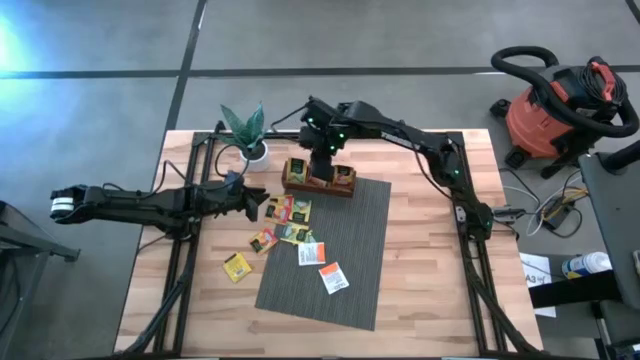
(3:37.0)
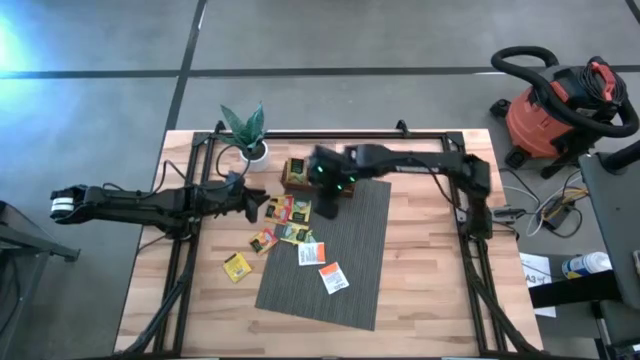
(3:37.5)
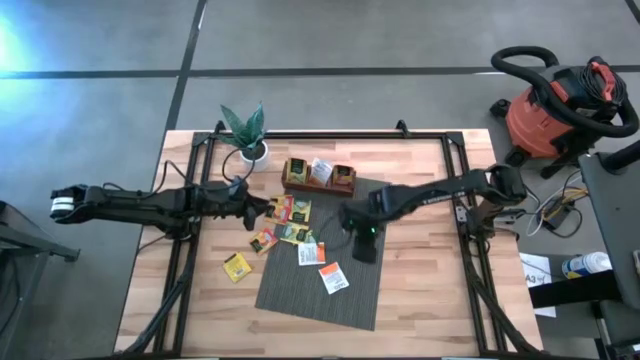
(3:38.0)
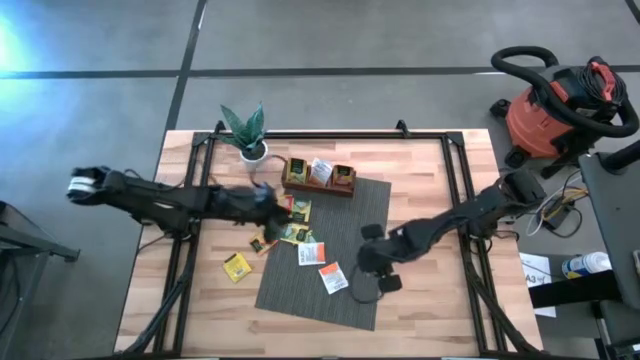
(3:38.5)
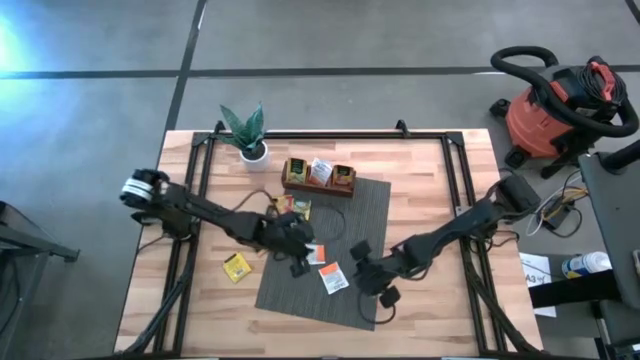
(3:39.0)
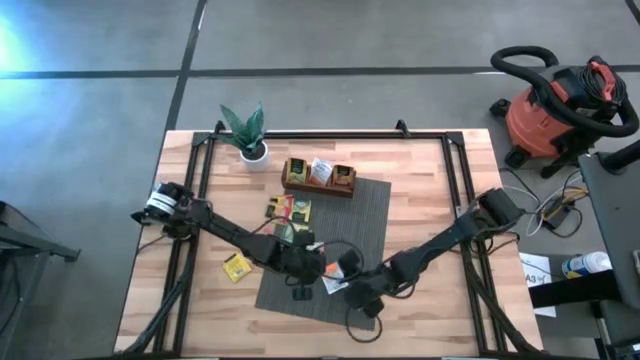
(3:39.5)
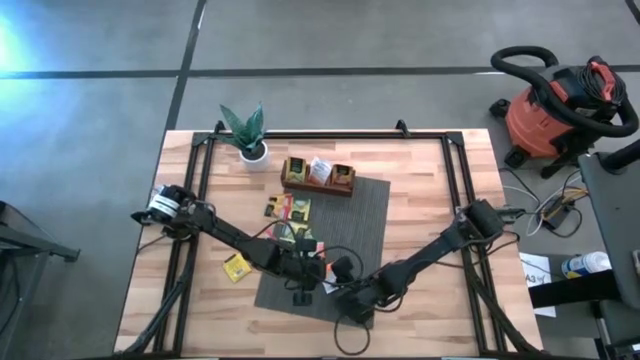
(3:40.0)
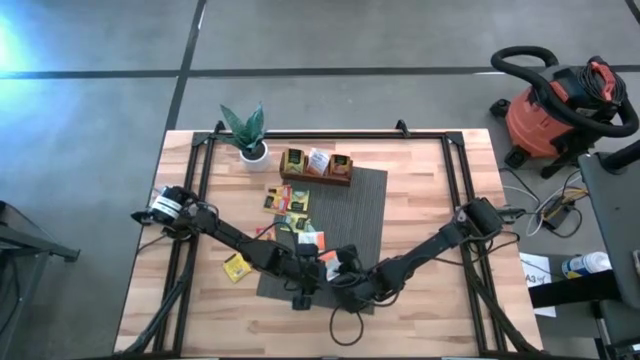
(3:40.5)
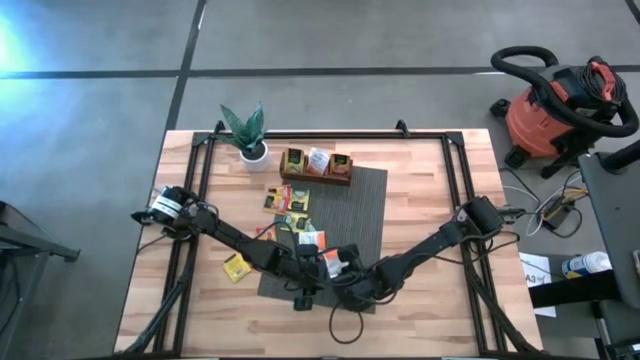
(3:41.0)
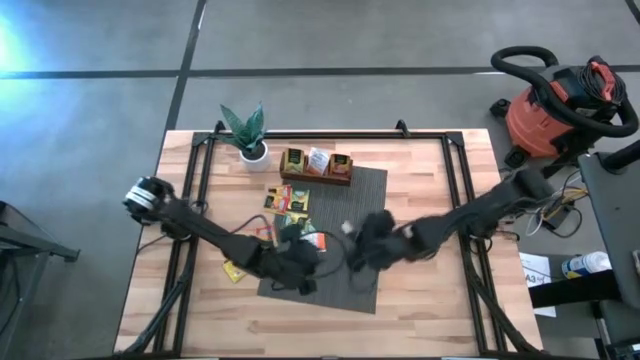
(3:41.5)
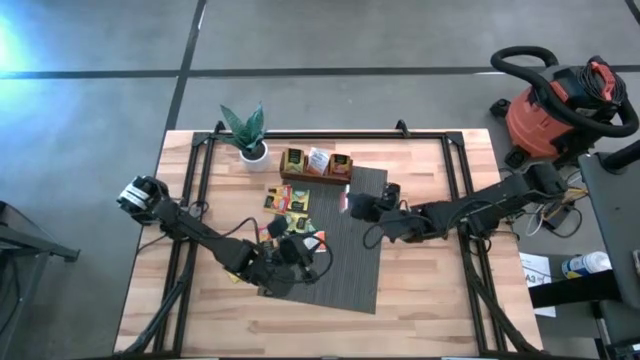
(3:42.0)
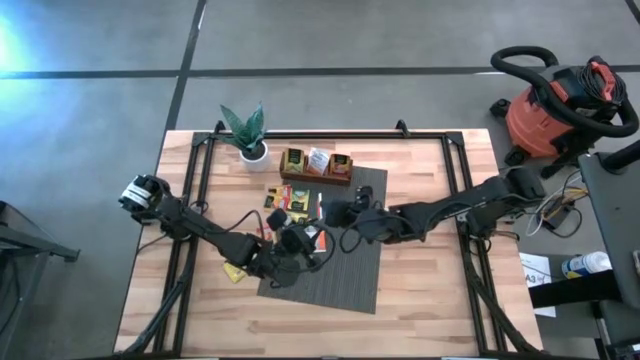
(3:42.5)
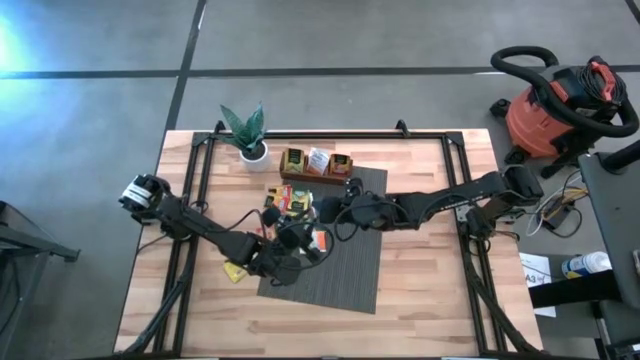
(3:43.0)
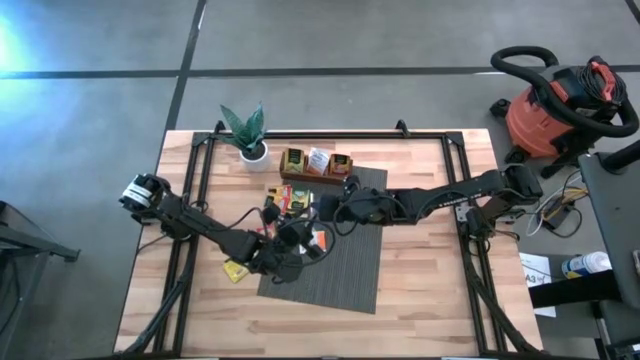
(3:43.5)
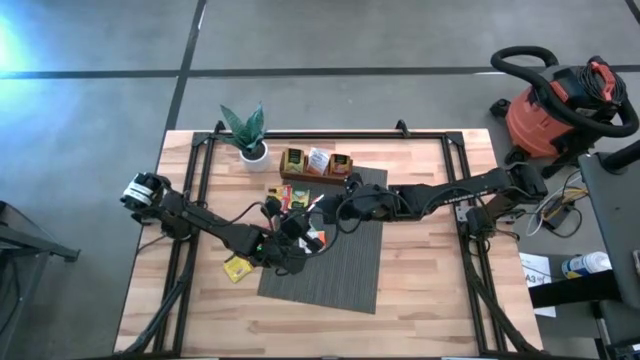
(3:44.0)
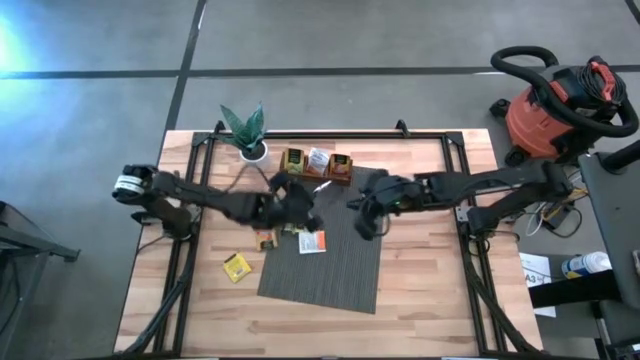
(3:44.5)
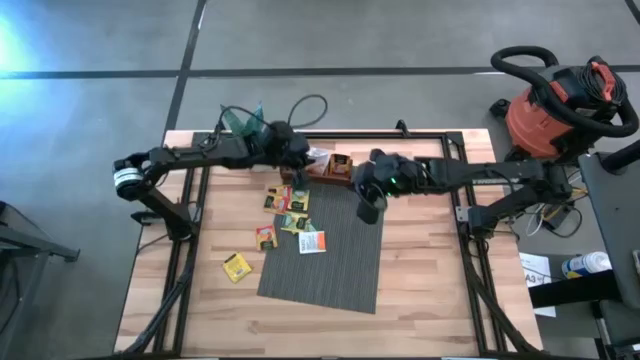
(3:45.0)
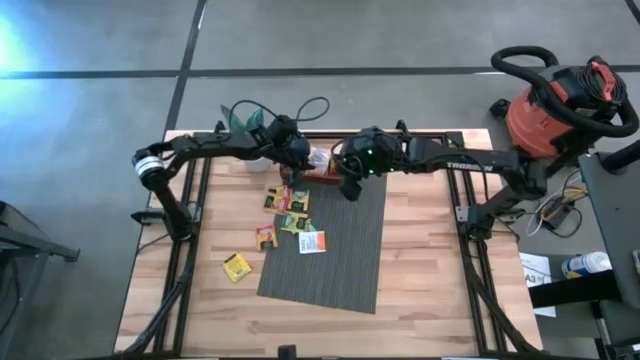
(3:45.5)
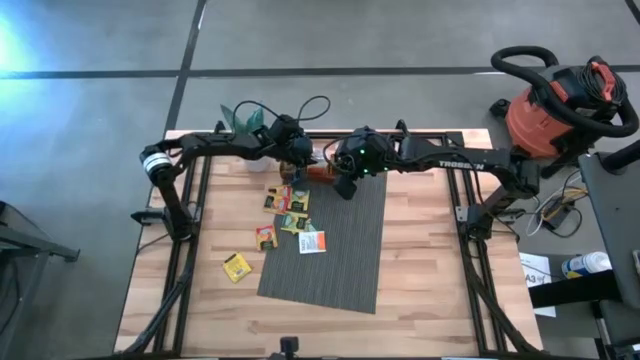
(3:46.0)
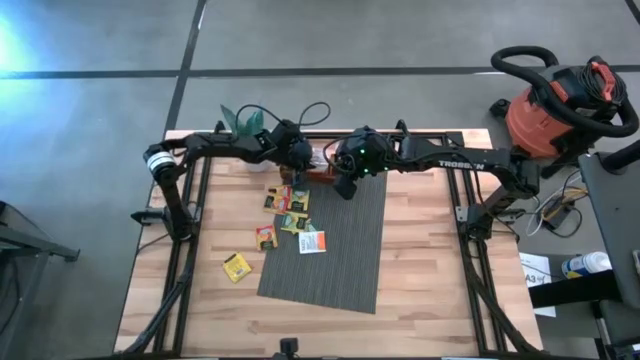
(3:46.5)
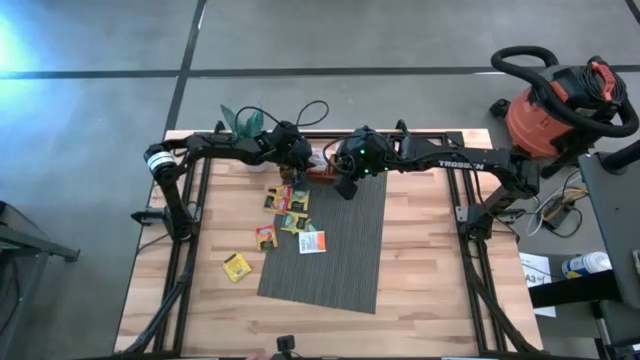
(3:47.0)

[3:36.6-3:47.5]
Task: Pick & Place Tea
Put the bottom white tea bag into the middle compartment of the wooden organizer

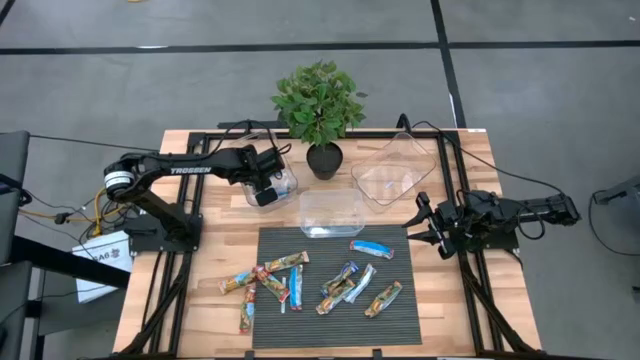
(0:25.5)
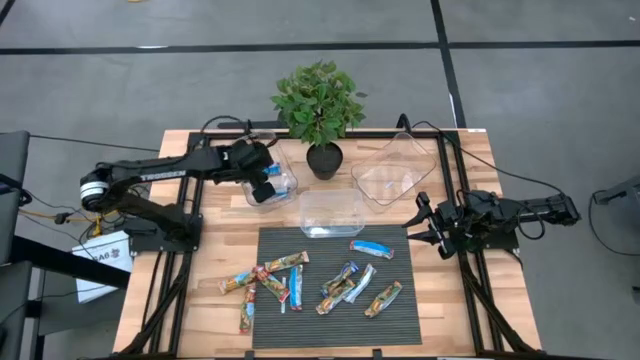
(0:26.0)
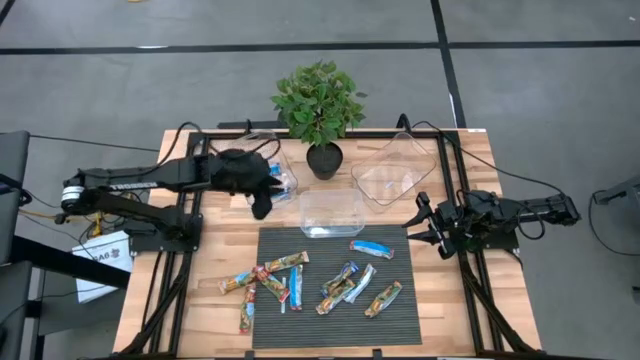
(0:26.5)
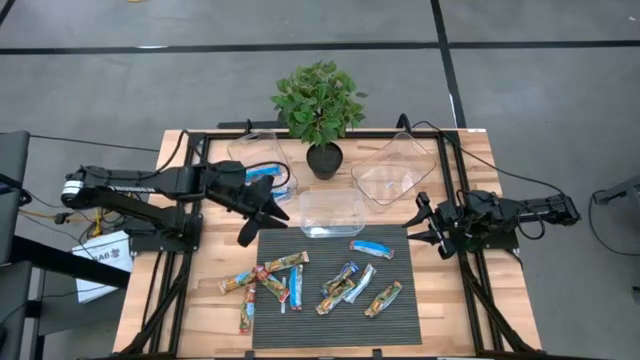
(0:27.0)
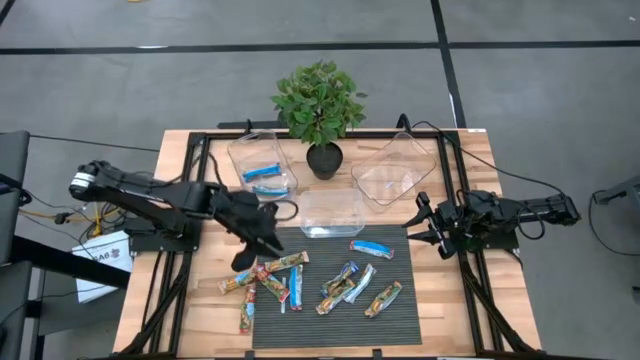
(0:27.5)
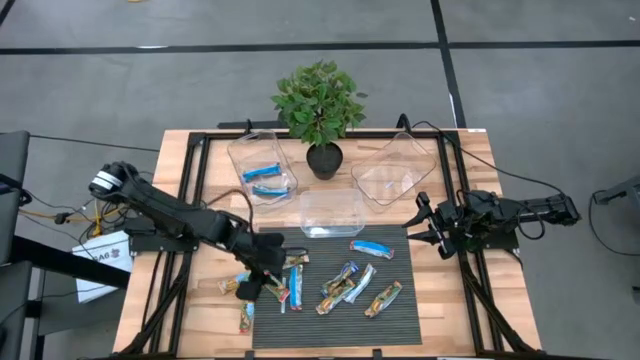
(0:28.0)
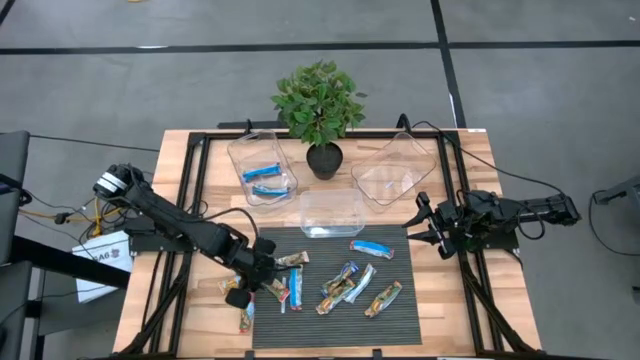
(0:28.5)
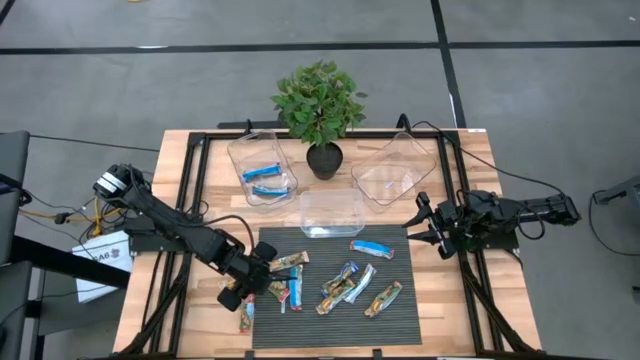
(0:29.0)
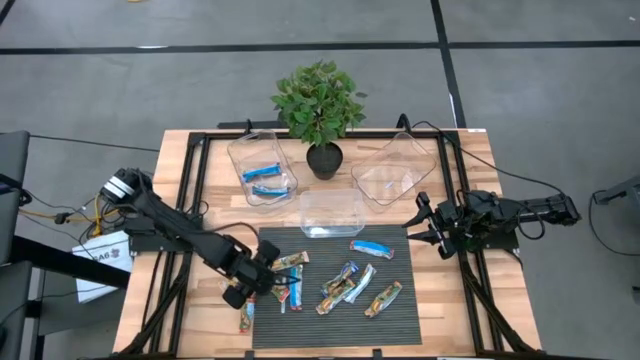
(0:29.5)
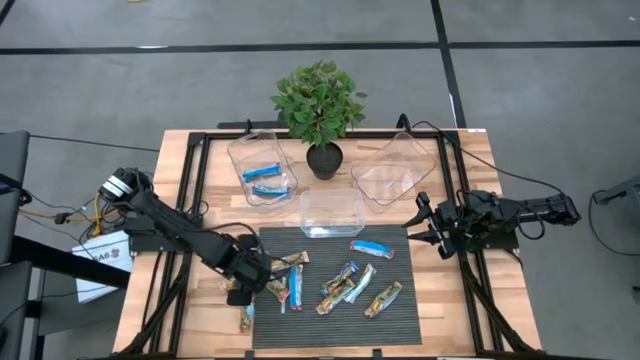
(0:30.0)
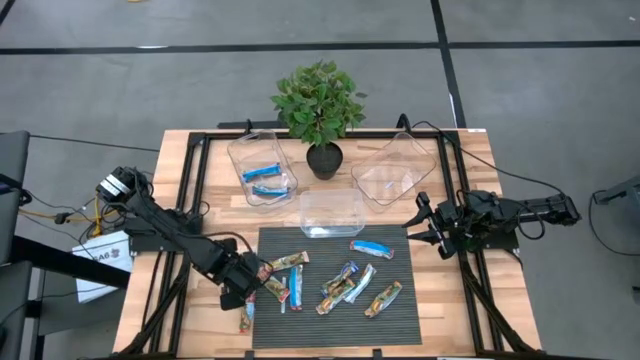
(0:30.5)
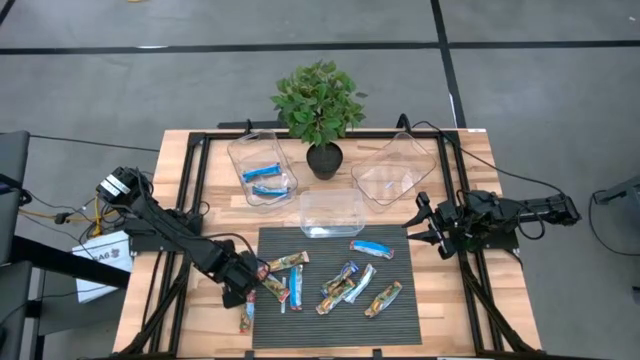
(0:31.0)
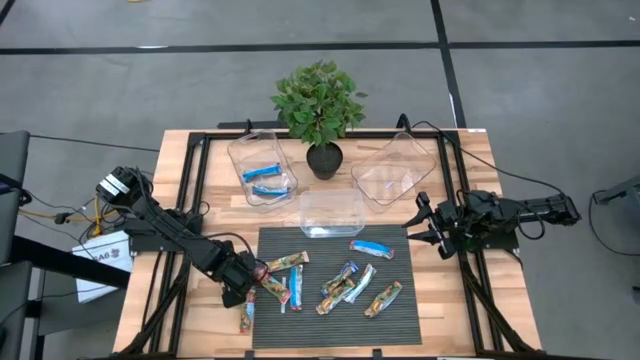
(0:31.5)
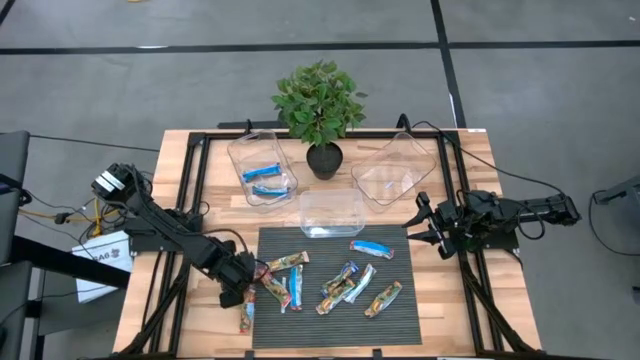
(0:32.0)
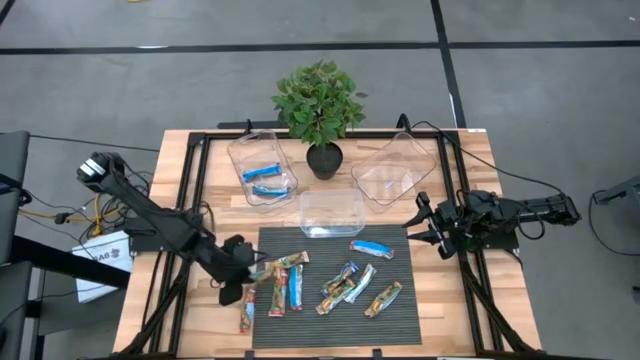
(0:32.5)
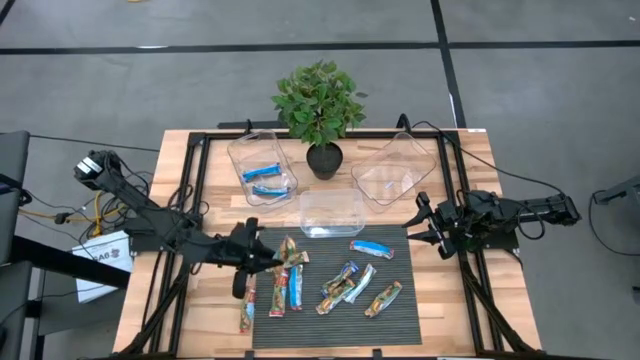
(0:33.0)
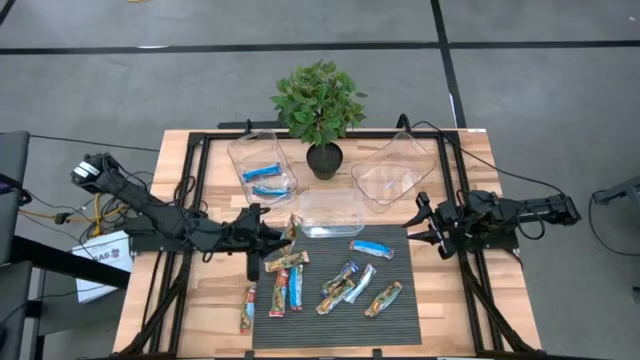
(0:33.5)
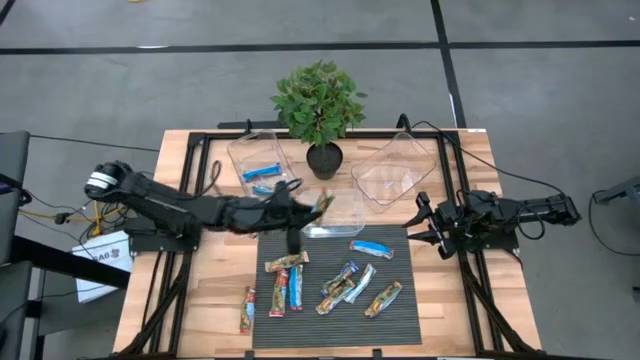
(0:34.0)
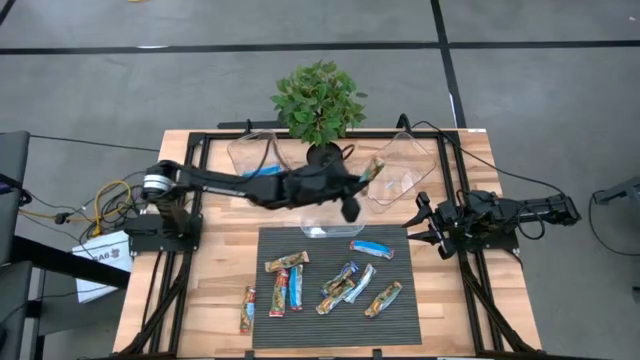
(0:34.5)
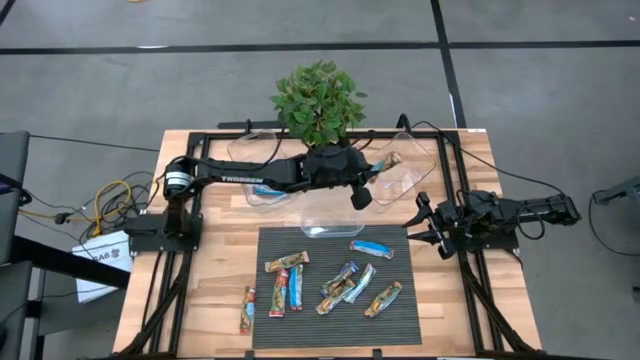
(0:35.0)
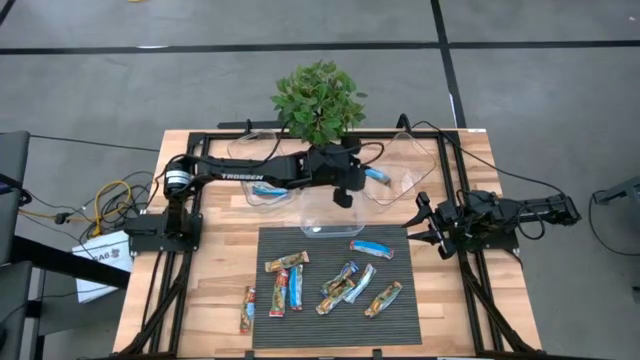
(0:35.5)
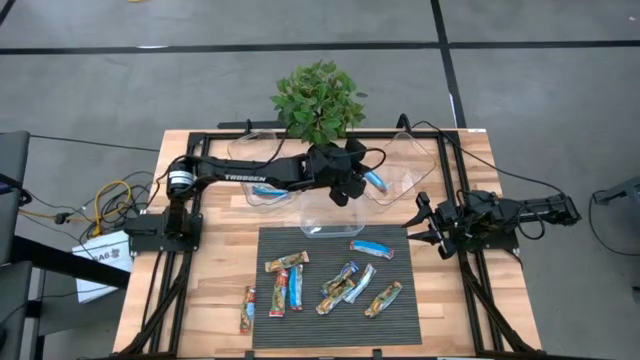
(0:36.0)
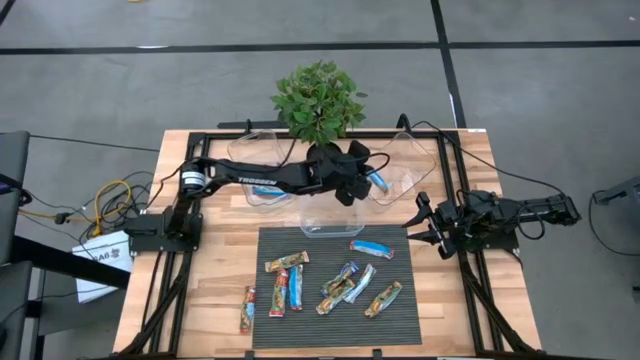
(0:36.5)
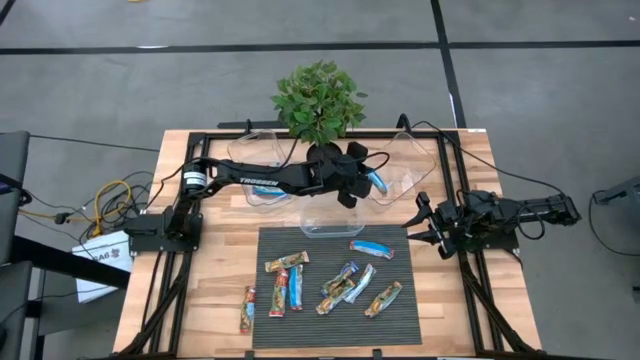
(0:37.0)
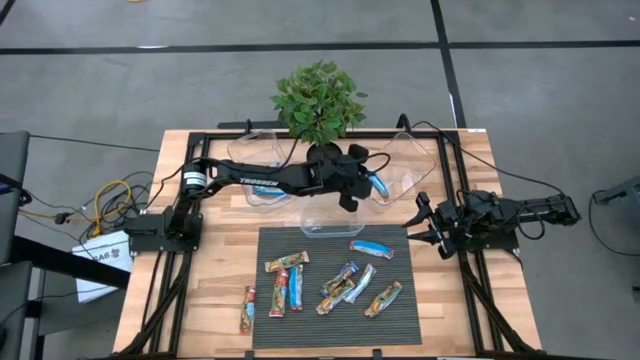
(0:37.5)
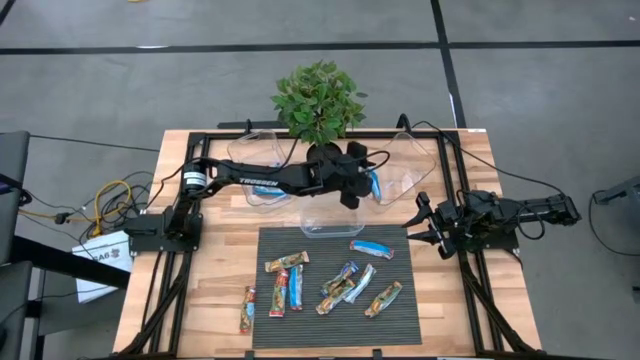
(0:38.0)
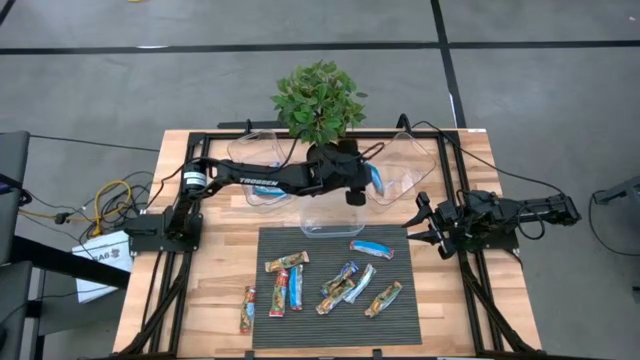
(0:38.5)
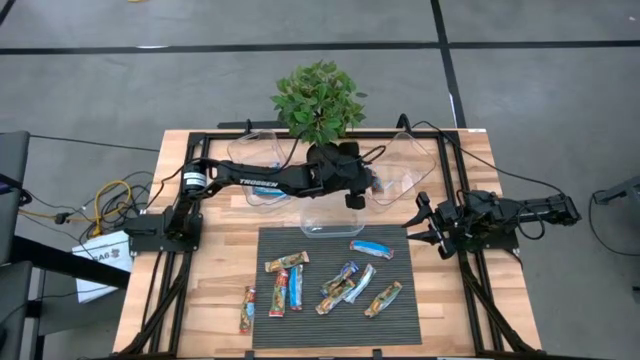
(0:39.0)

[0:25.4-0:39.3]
Task: Pick and place Granola Bars by type
Put the yellow granola bar into the right transparent bin
